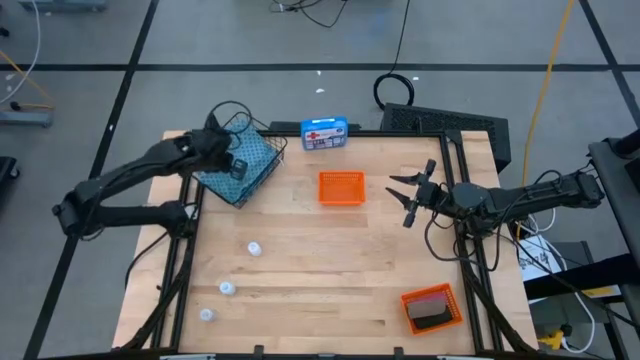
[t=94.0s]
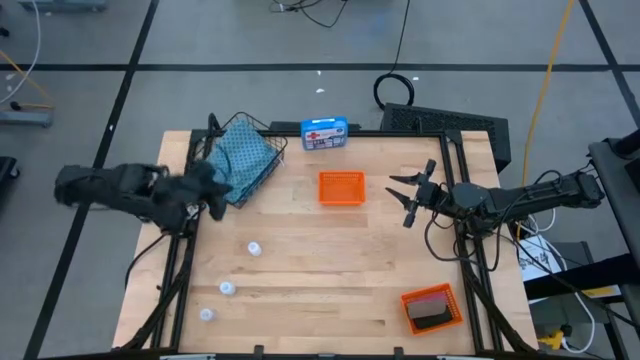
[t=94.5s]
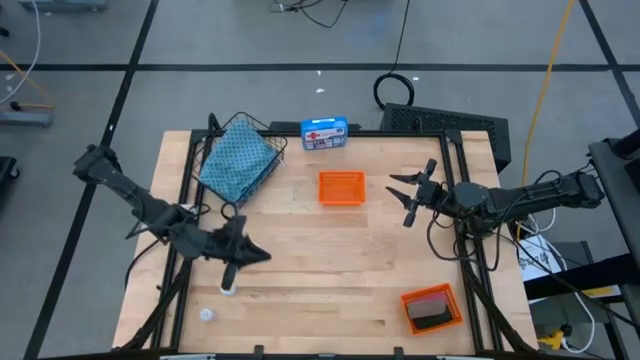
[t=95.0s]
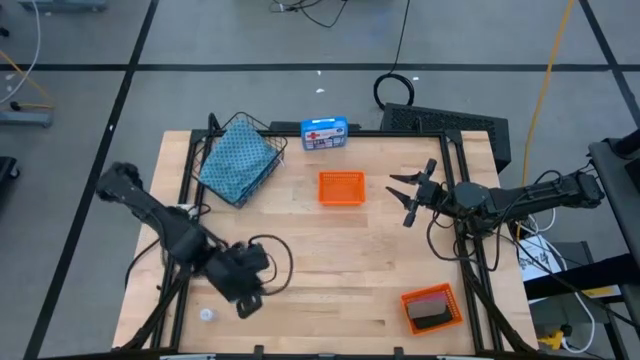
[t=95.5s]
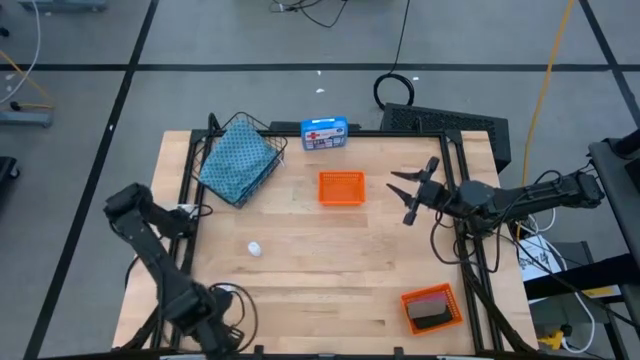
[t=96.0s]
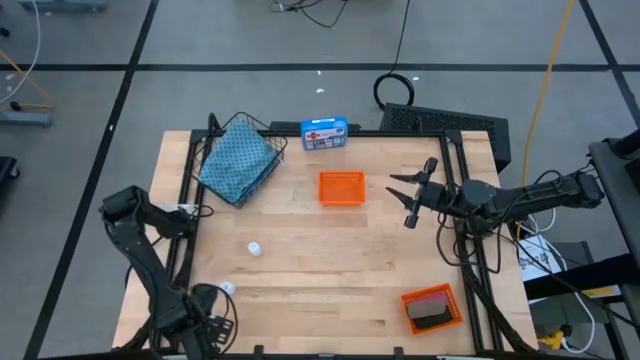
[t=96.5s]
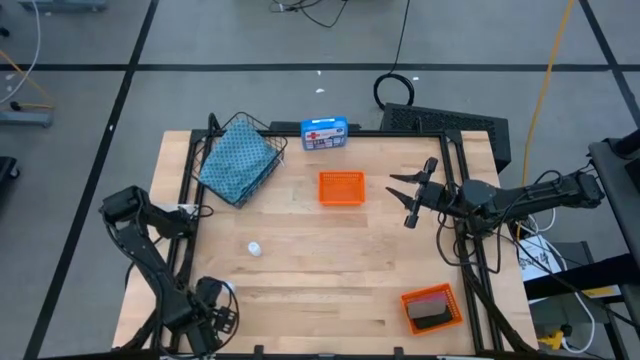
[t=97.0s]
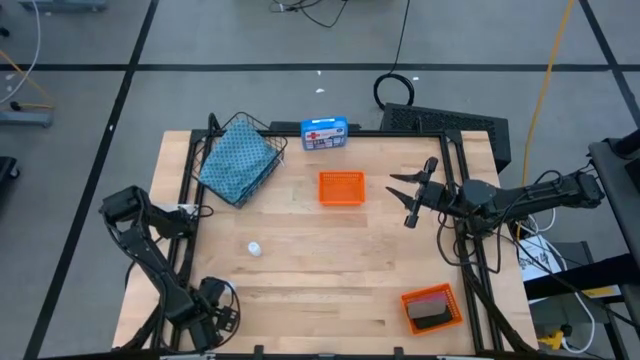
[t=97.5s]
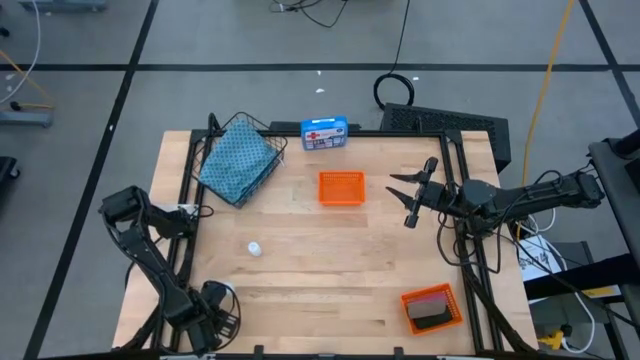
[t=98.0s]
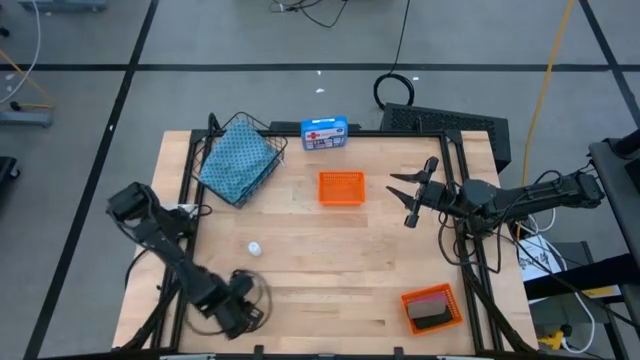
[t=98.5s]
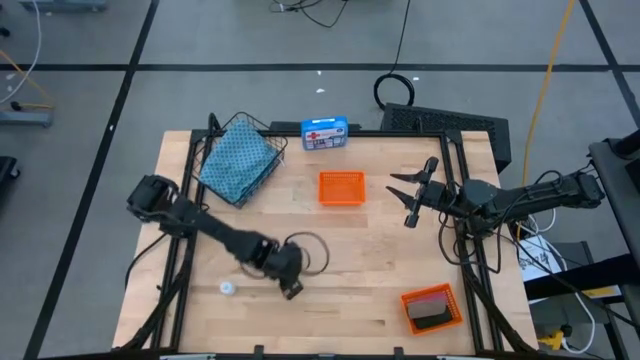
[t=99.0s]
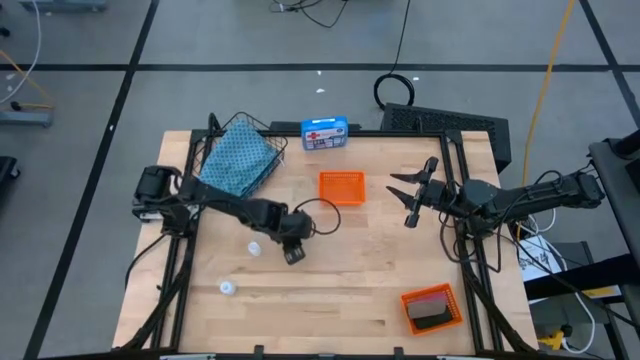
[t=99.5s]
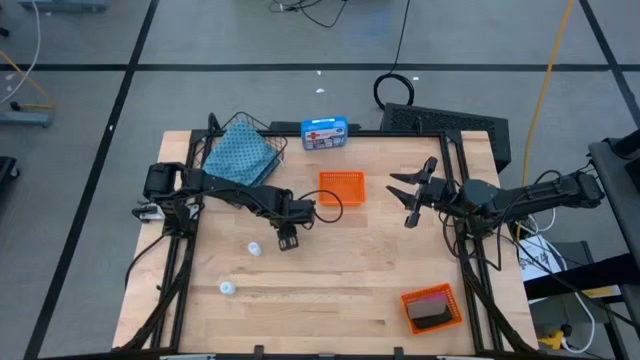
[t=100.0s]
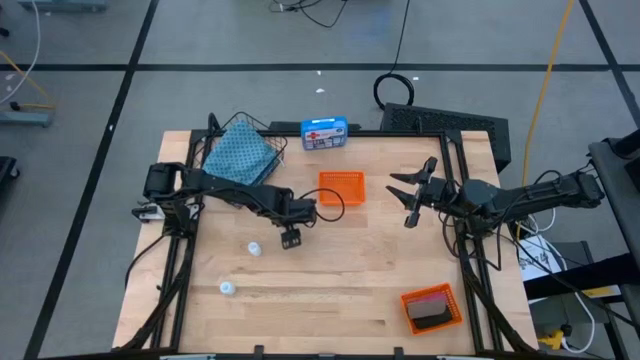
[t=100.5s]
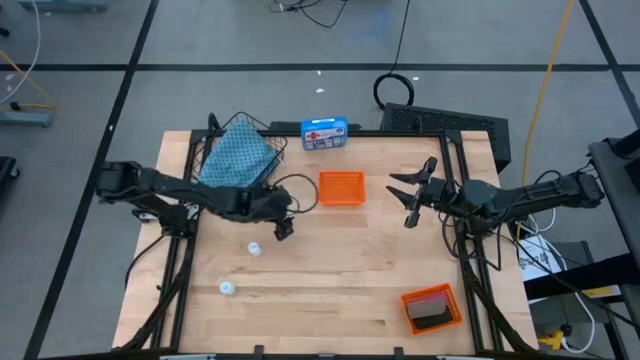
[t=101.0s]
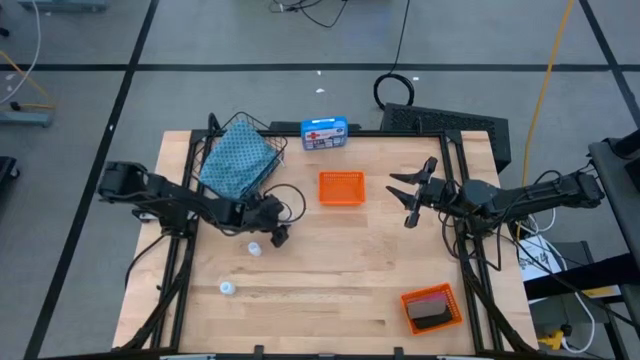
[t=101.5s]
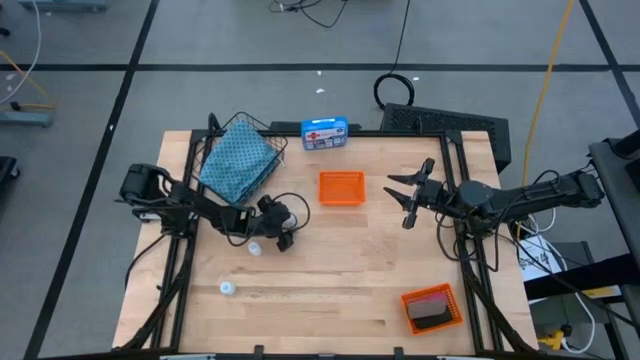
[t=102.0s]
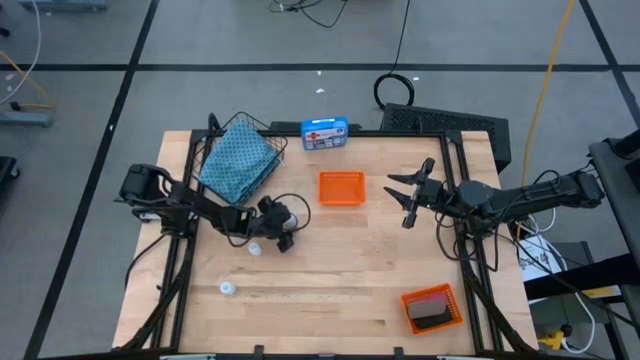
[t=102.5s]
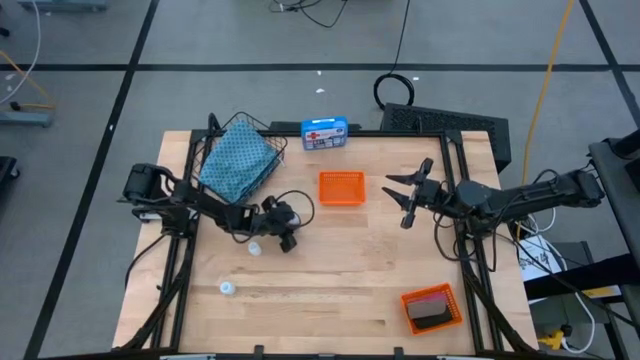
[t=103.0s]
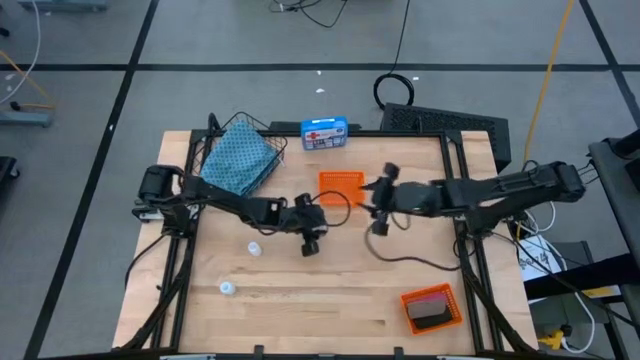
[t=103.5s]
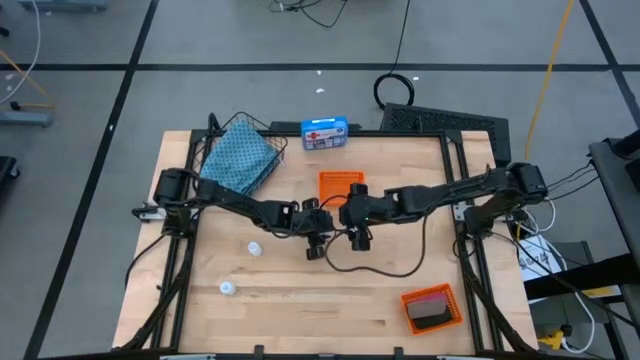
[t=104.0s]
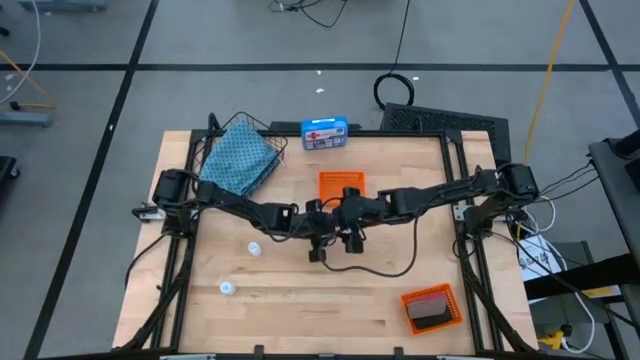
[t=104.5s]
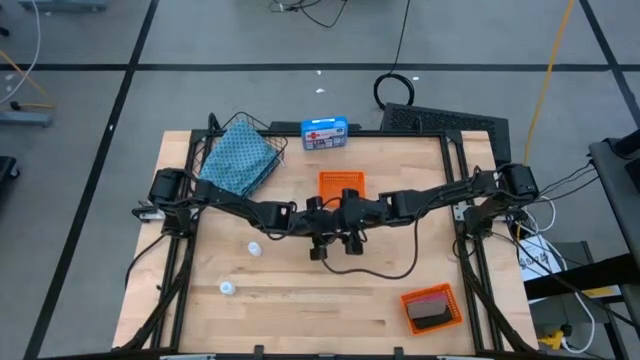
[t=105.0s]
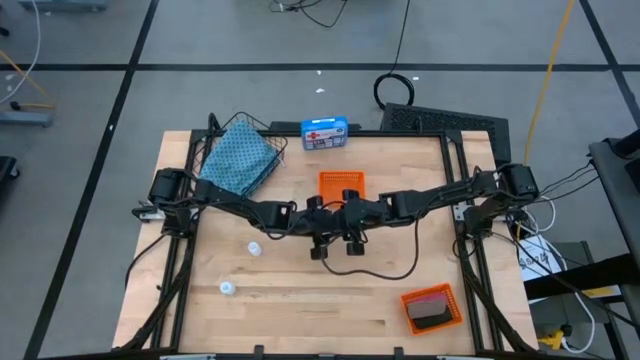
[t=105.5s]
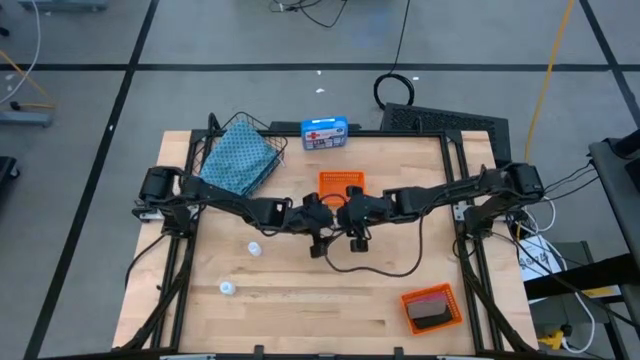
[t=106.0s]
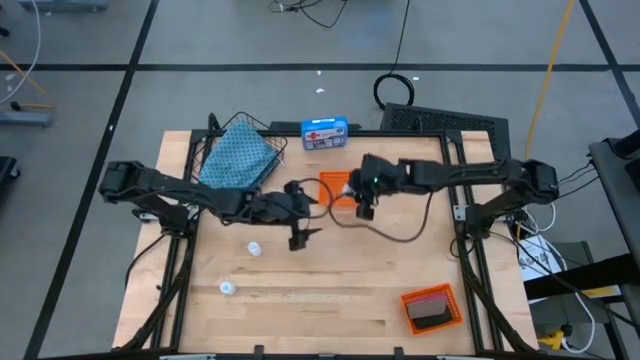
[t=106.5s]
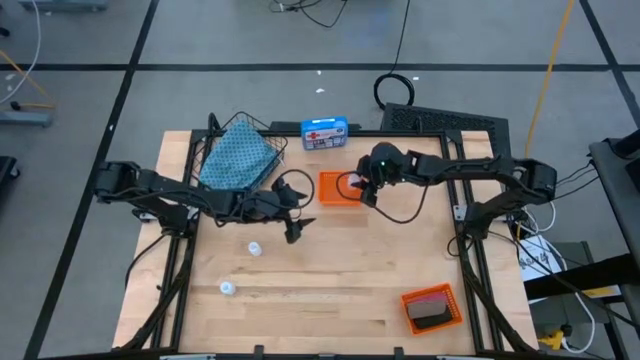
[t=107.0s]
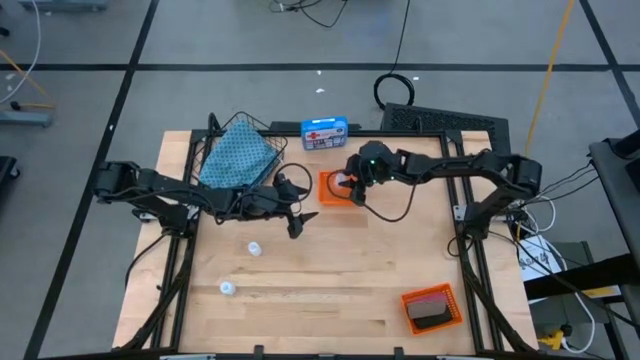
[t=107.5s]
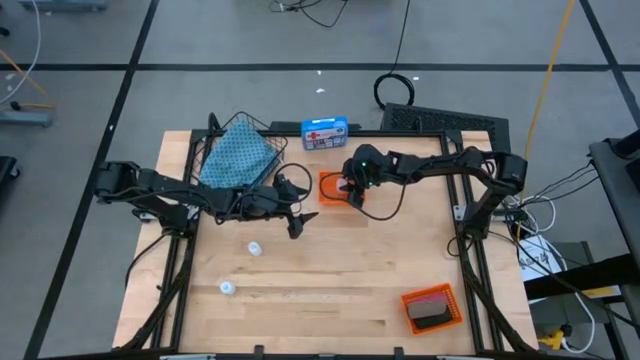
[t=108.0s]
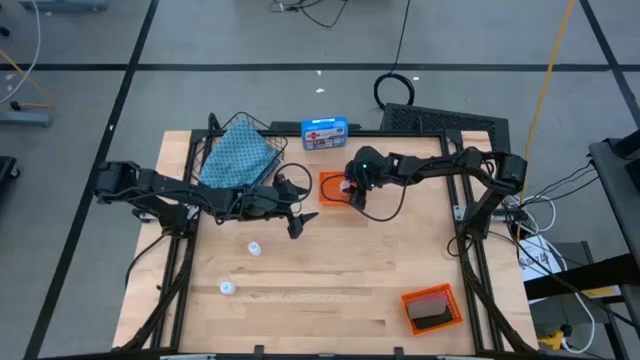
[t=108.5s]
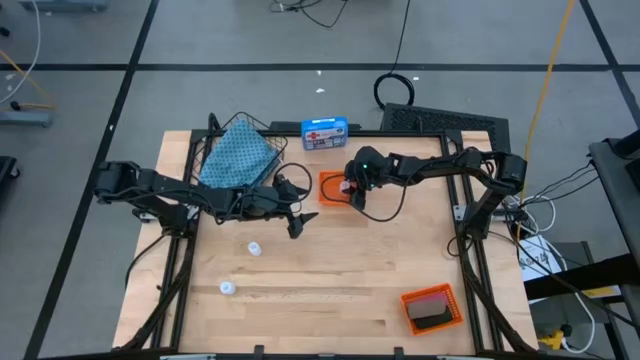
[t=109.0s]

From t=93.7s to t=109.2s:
Task: Pick & place medical supplies in basket/bin
Put the bottom transparent pill bottle into the top orange bin

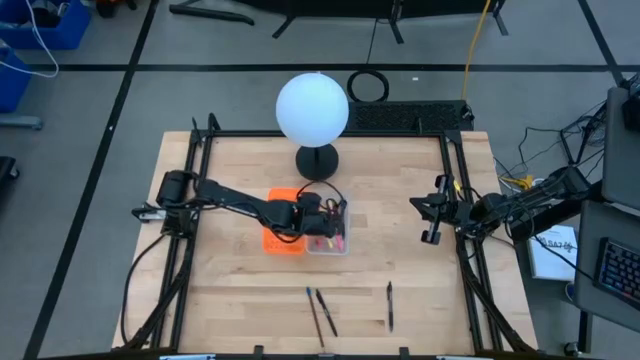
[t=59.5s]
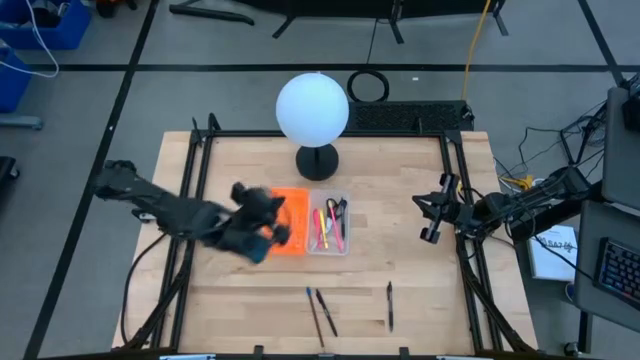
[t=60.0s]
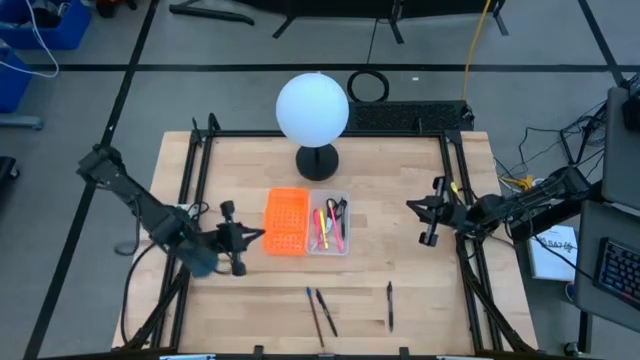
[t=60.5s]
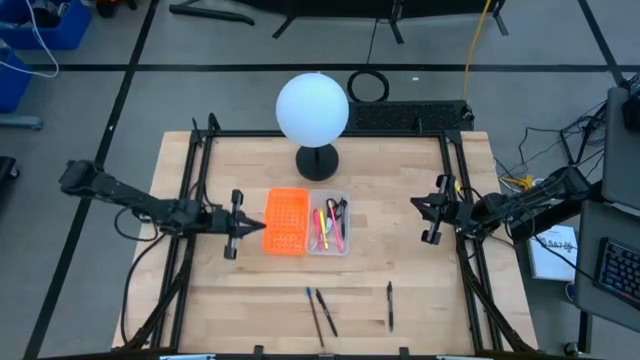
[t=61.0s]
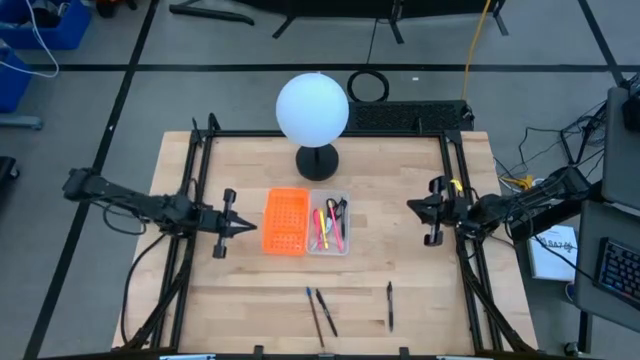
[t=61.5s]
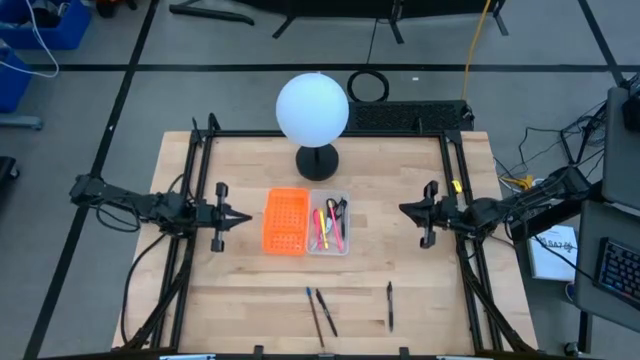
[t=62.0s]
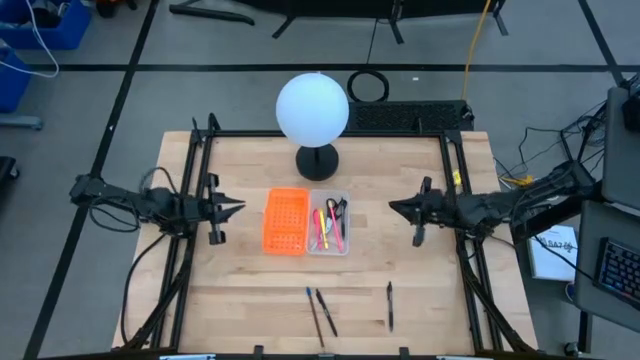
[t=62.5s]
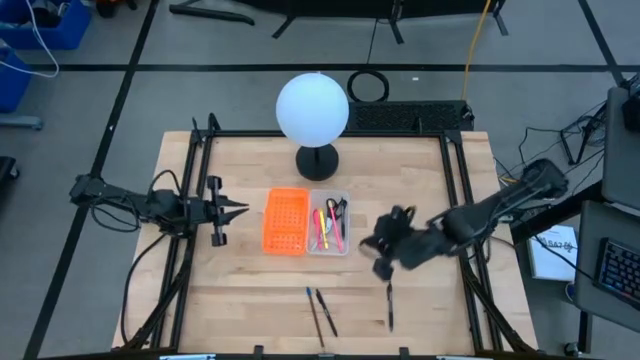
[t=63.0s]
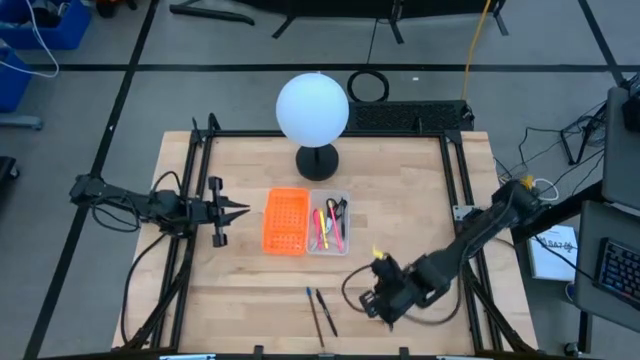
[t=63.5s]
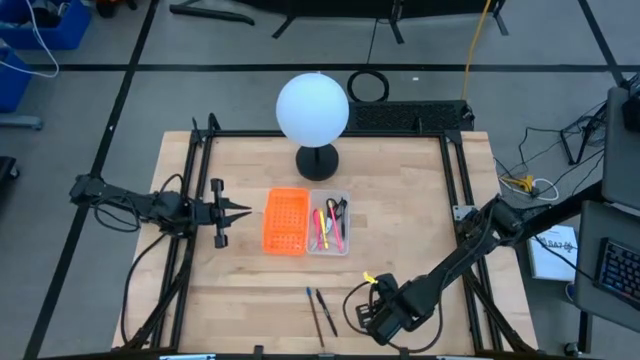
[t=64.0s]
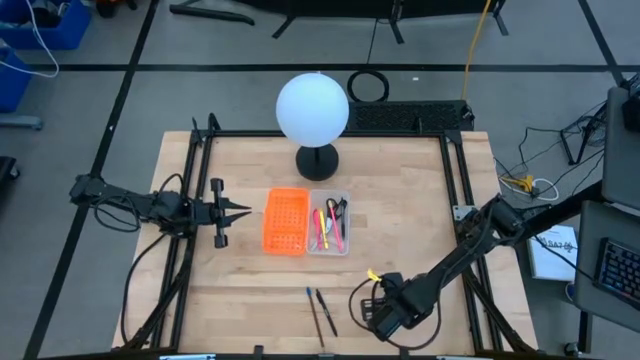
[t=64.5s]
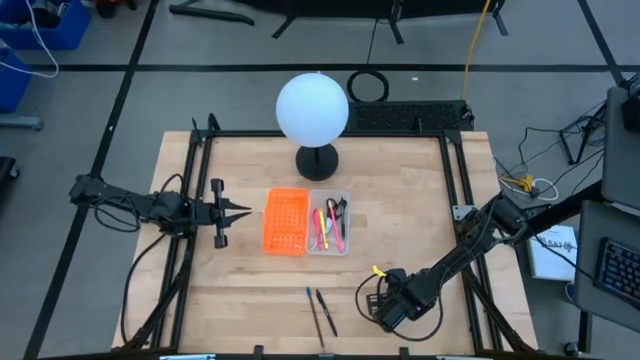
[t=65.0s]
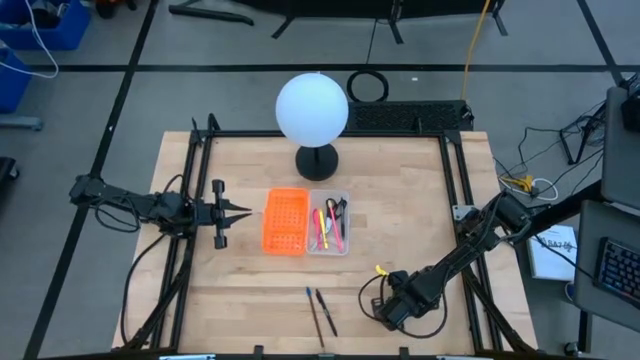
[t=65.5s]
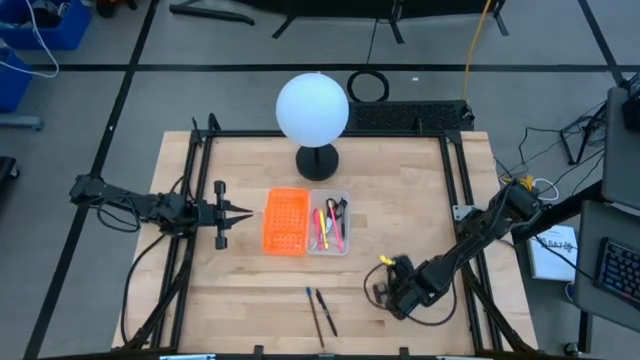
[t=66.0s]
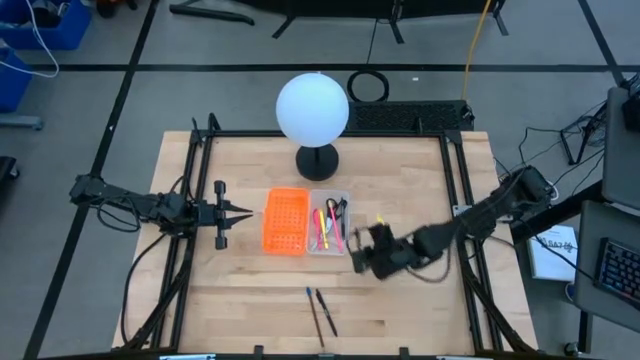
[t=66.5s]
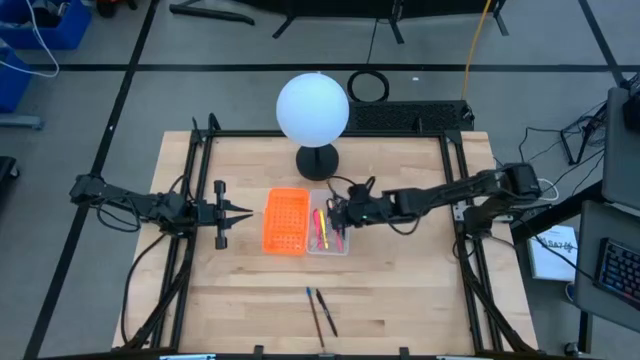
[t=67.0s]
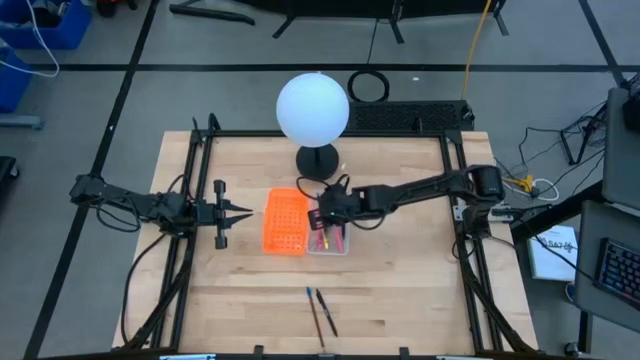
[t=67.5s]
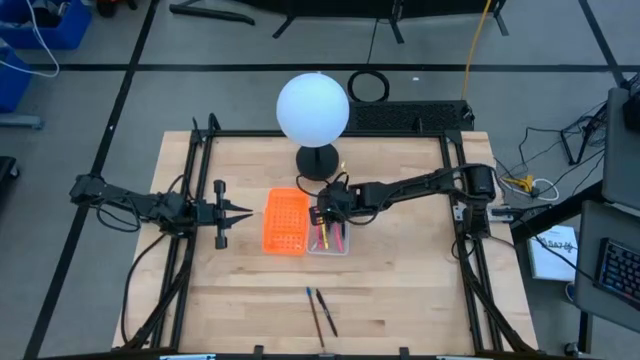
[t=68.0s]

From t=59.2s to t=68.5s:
Task: Pick & place school supplies into a supply box
Put the right black pen into the orange supply box
